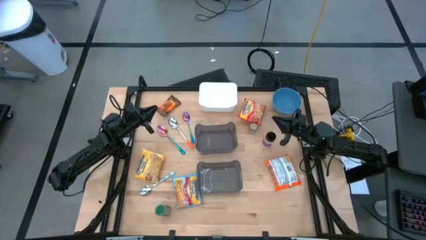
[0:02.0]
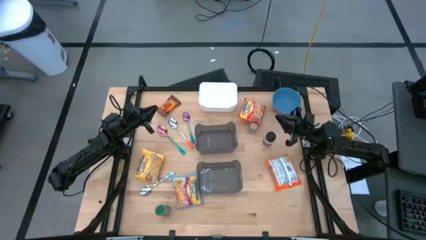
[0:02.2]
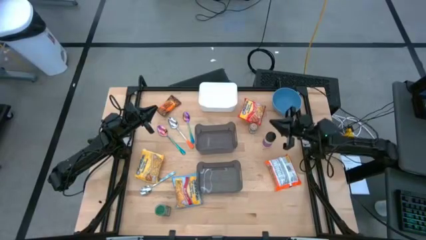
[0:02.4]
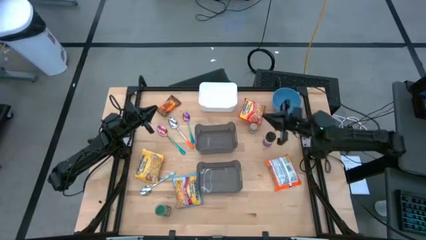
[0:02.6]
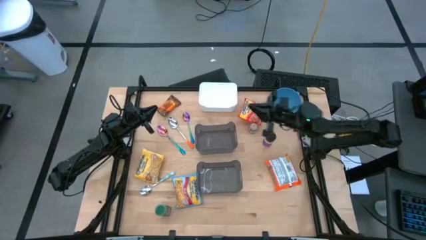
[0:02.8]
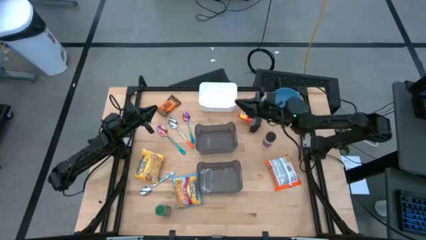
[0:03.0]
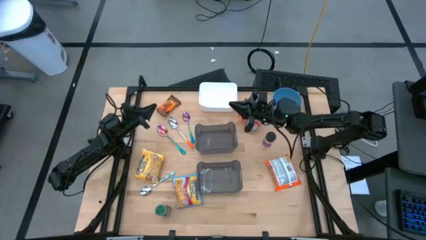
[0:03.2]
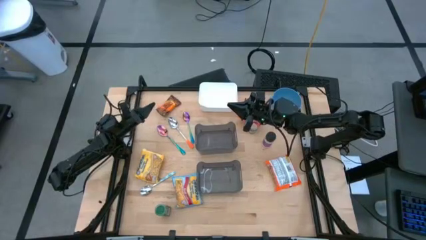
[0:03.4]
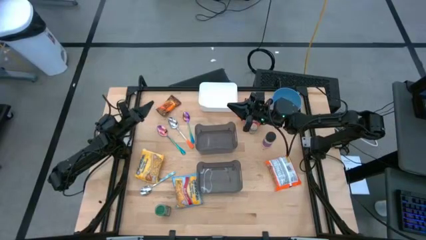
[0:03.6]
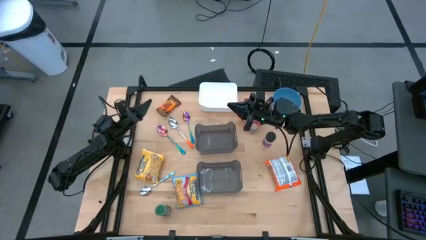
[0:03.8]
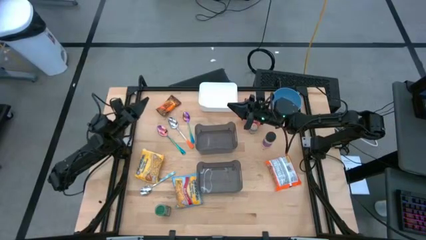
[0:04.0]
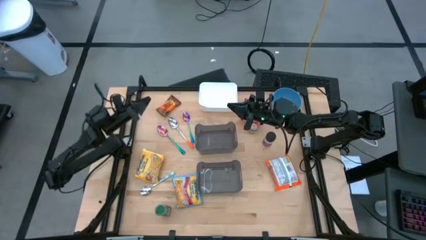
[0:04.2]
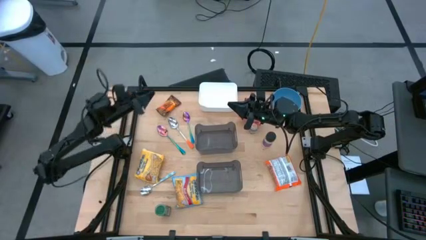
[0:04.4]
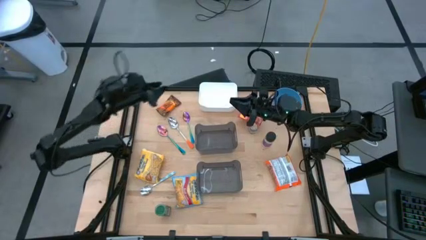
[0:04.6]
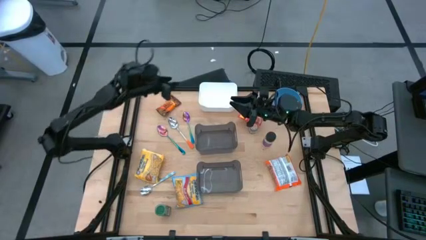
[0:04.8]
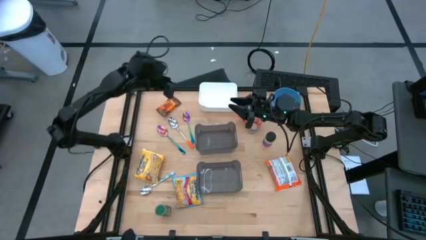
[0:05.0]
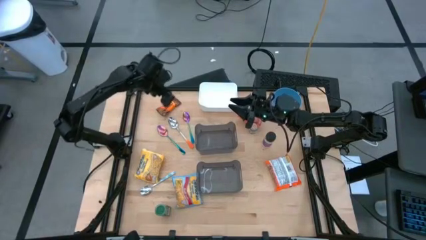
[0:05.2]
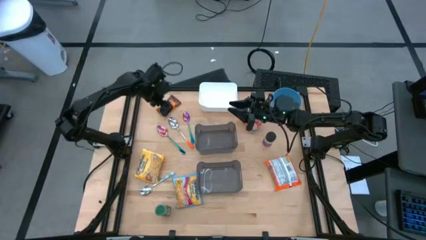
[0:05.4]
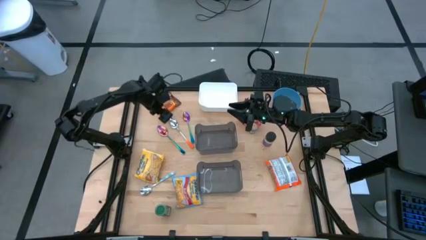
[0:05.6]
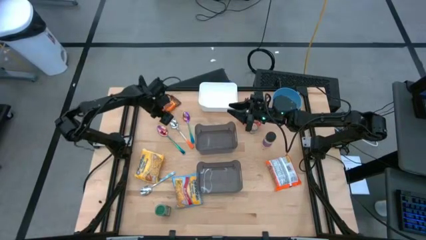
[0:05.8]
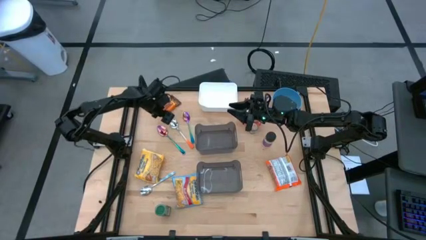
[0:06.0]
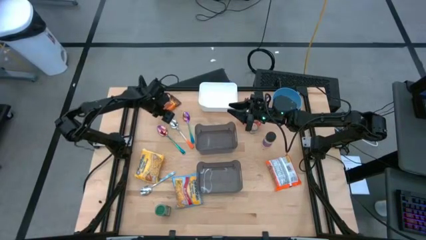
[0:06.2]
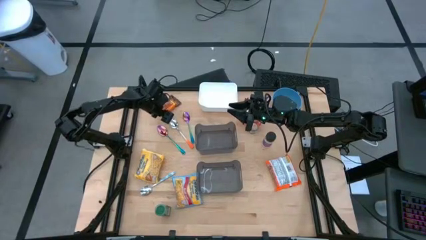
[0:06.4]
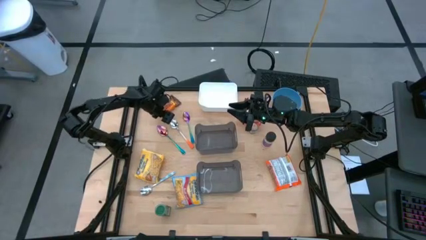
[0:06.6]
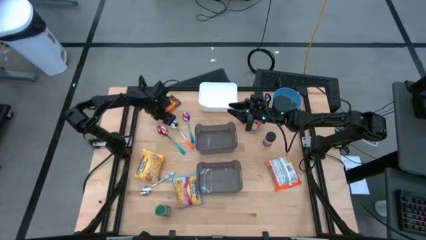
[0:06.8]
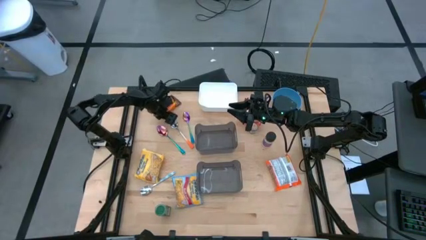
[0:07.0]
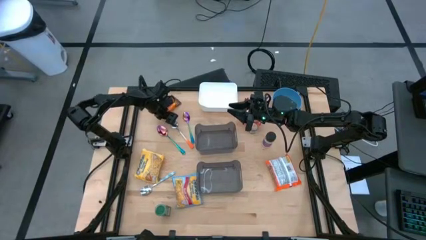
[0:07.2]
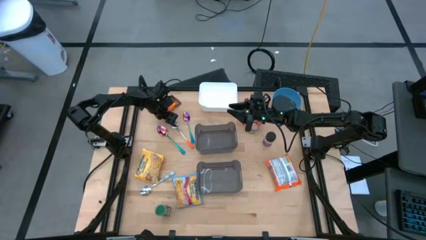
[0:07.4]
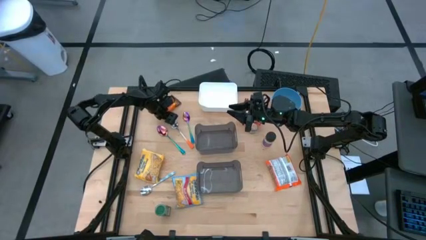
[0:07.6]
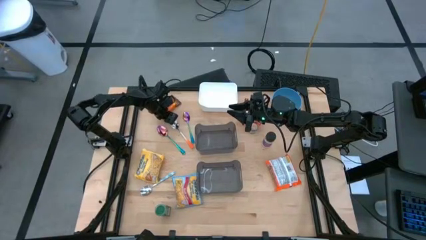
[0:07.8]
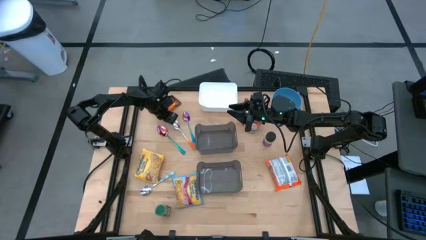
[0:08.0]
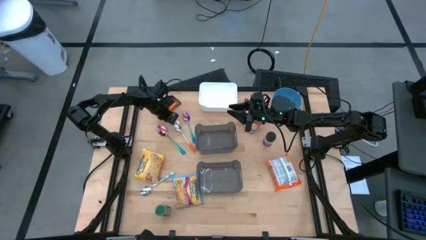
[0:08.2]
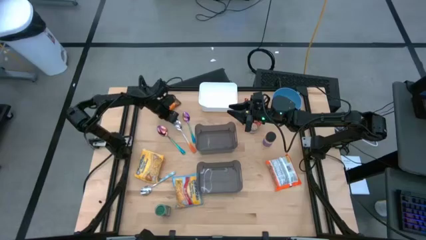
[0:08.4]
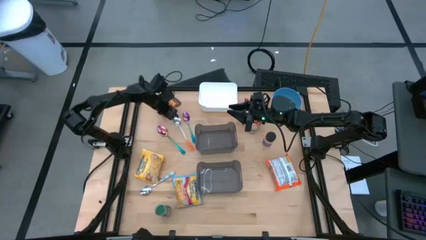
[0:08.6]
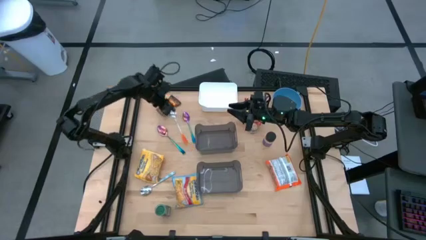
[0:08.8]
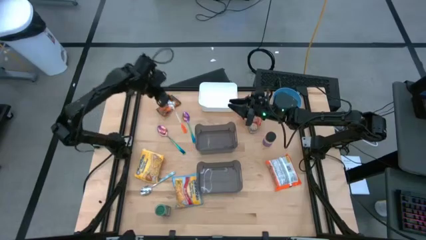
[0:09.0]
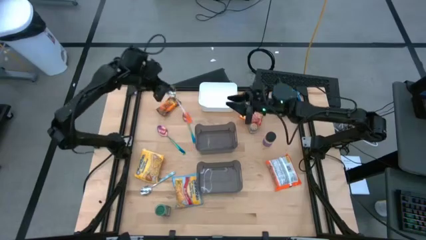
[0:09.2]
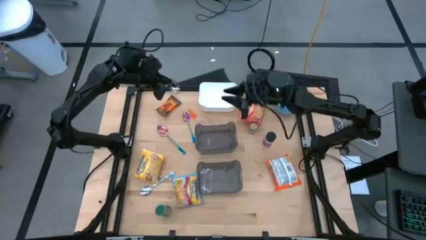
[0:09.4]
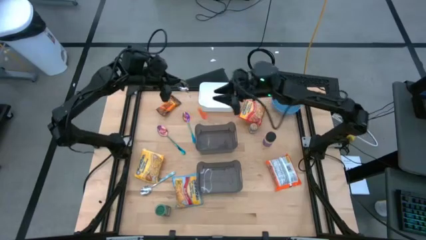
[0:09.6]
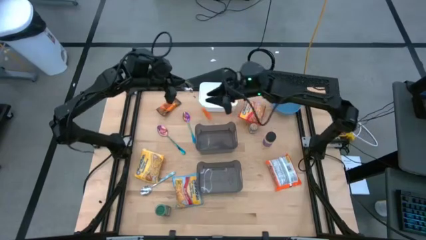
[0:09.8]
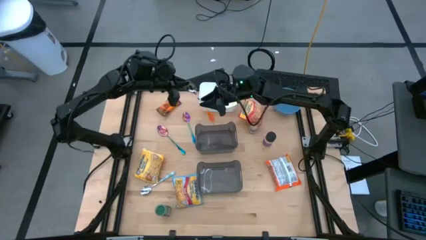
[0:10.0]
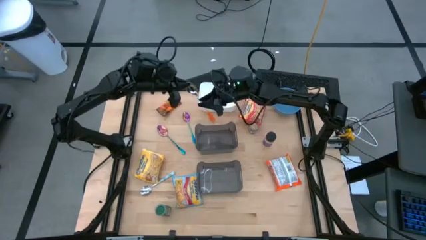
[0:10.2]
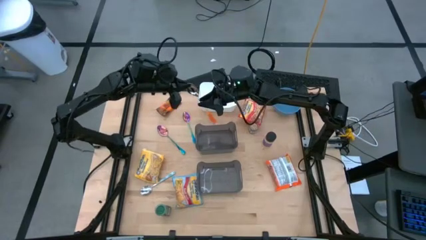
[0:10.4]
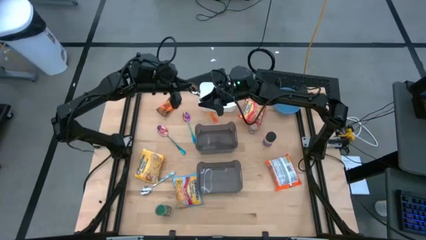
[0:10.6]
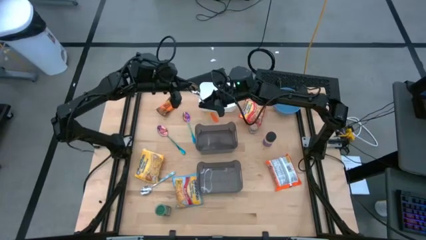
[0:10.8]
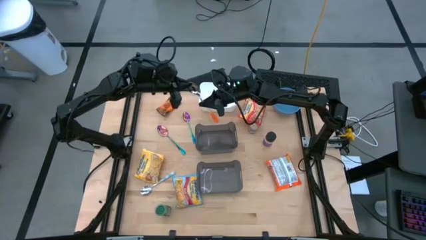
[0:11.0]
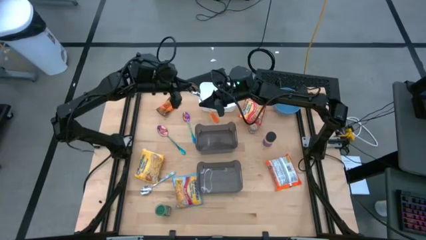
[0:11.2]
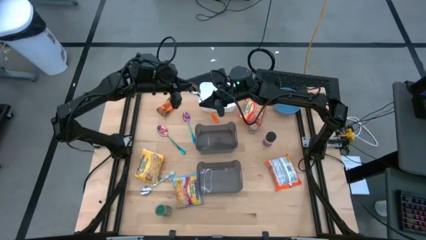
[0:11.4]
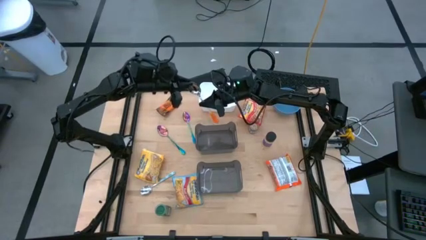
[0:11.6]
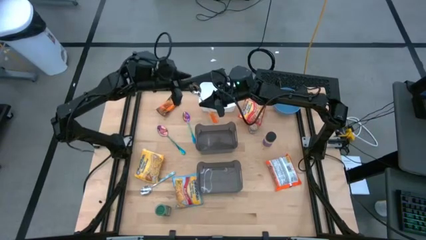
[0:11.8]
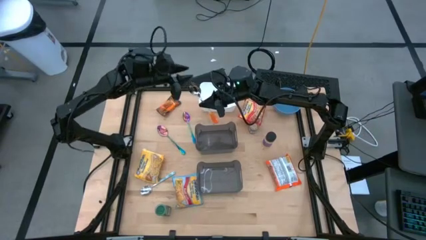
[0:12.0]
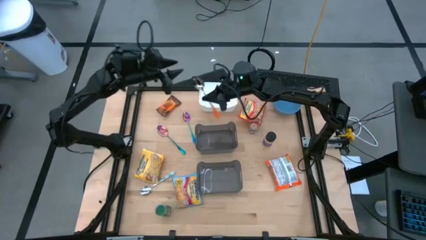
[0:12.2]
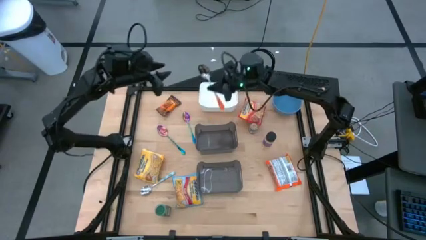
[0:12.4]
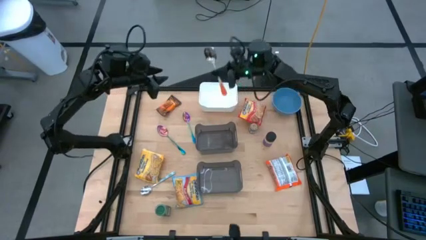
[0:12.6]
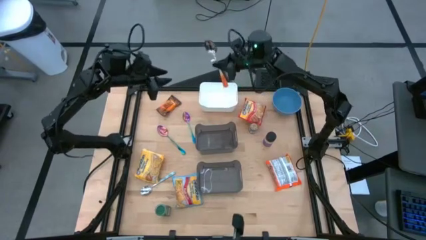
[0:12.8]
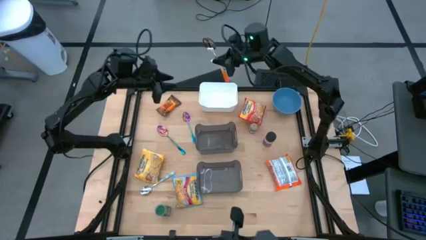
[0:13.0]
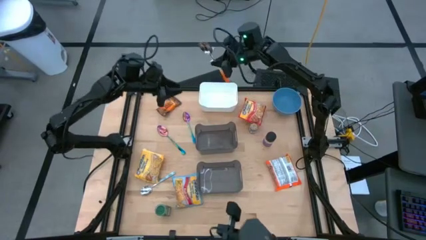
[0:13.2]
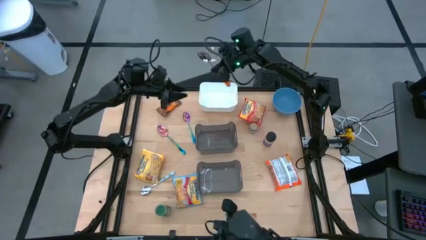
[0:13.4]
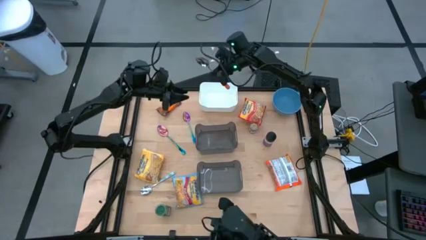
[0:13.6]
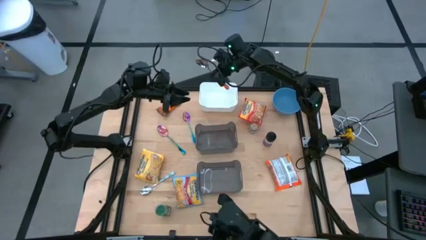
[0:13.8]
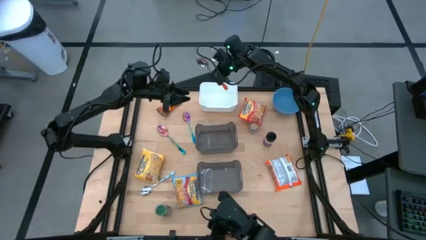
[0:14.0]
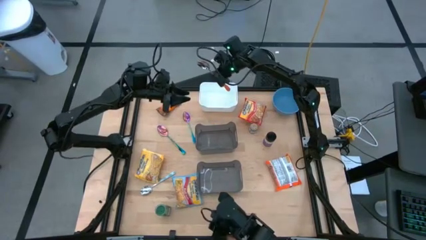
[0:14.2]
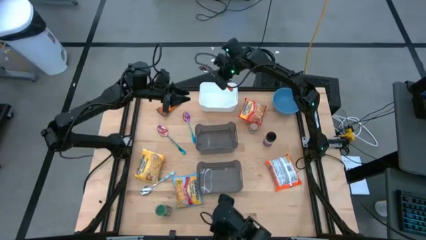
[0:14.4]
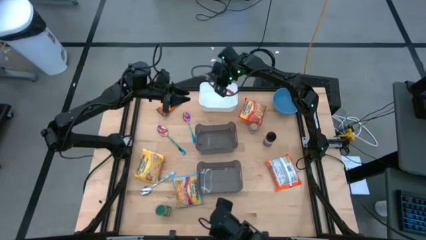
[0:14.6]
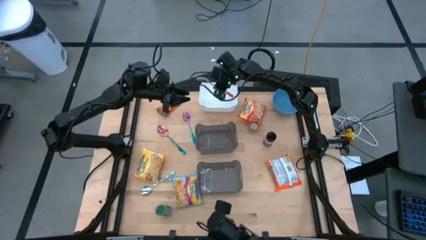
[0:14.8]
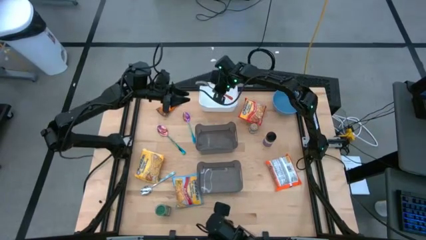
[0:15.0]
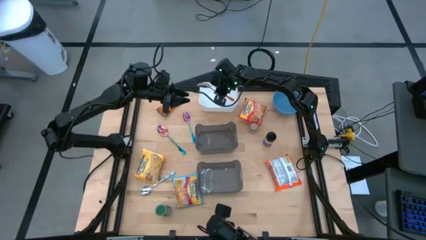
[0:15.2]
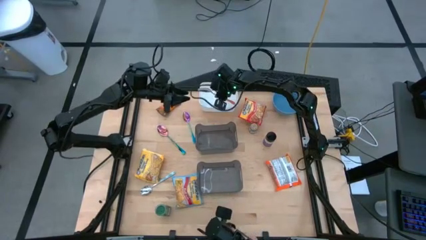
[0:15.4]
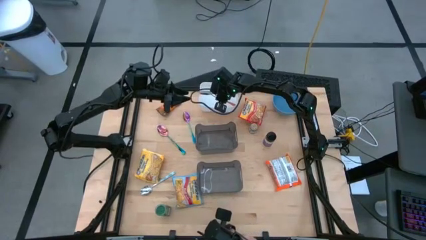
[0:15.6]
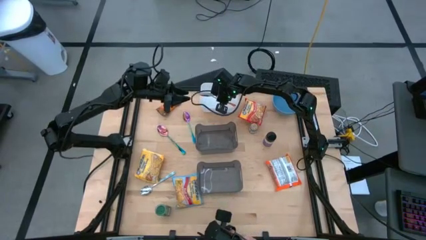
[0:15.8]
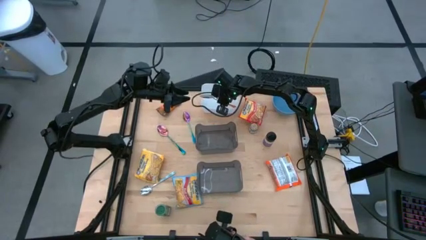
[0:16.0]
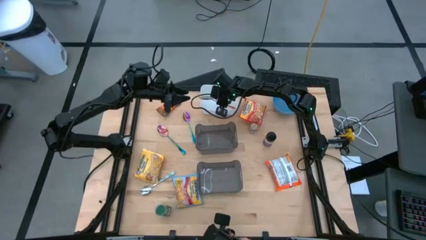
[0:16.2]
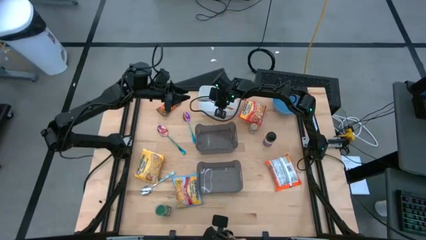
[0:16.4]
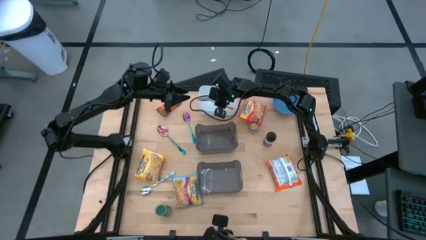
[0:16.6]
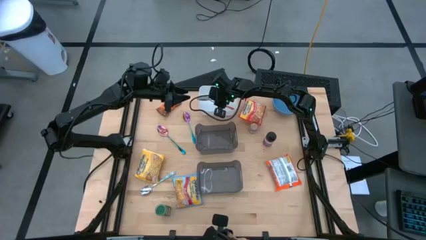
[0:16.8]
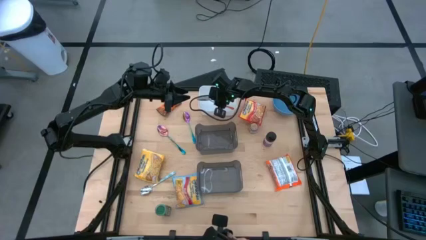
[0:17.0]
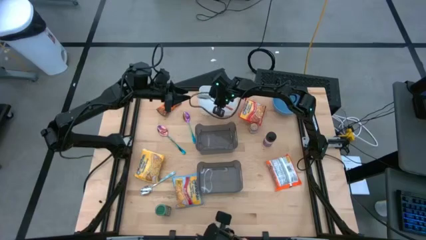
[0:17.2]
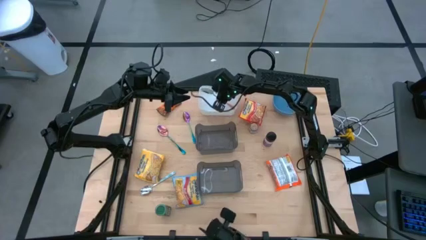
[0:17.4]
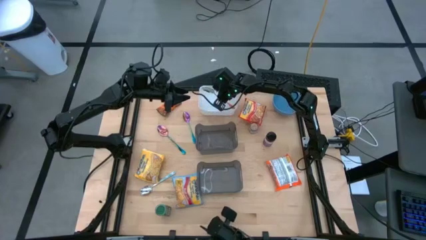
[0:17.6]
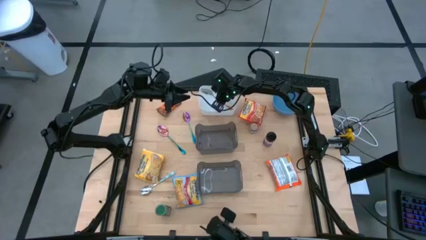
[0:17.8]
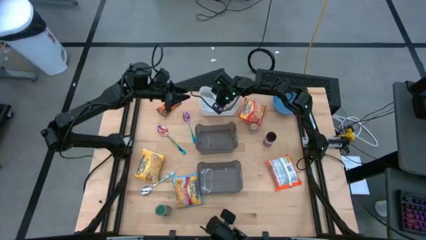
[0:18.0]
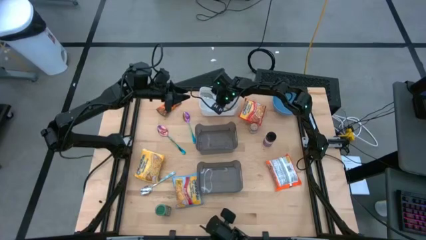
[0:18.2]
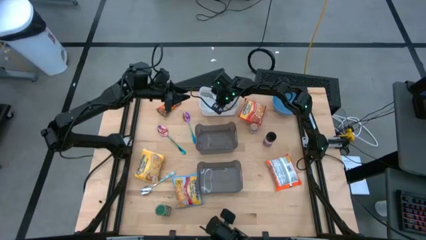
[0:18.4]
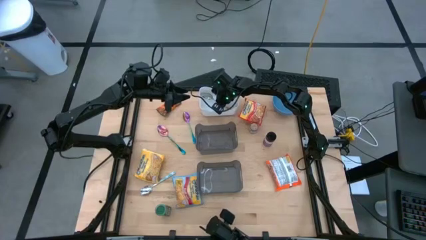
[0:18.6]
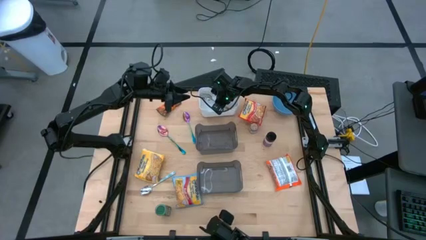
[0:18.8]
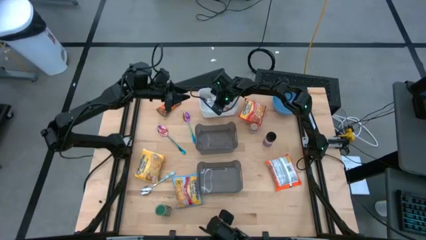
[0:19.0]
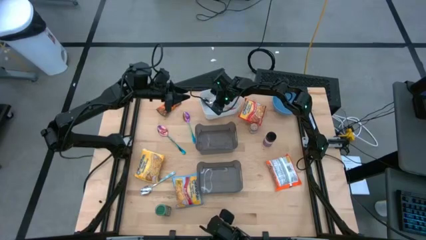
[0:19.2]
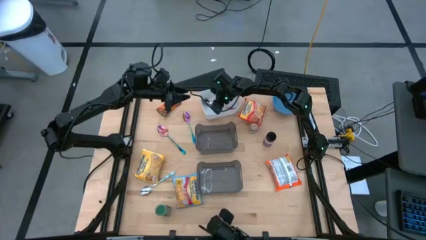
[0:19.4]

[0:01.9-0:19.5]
Task: Pick & Place Food Item
Put the orange spoon into the white bin
